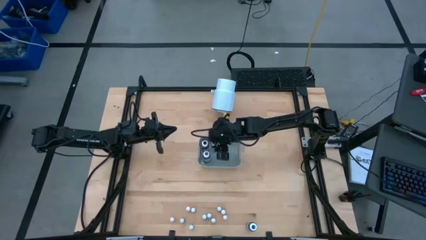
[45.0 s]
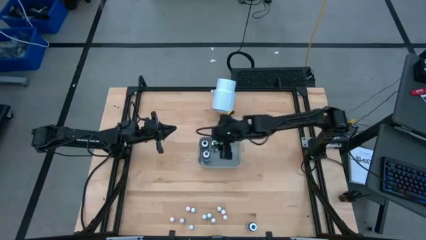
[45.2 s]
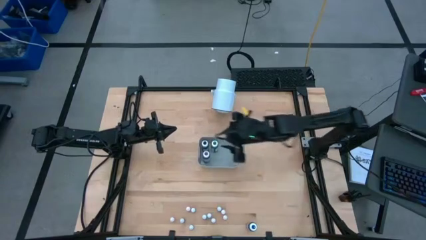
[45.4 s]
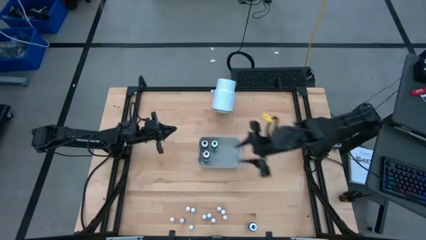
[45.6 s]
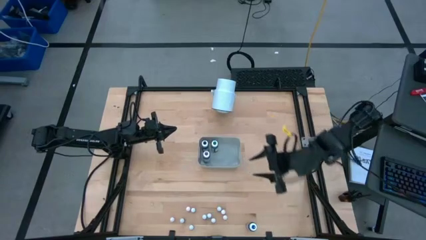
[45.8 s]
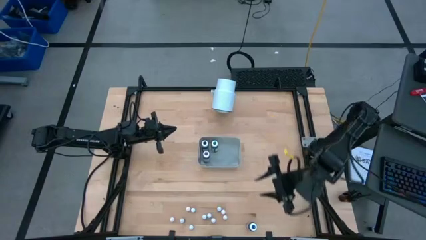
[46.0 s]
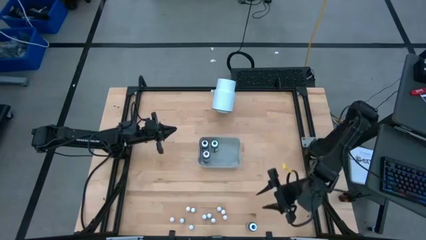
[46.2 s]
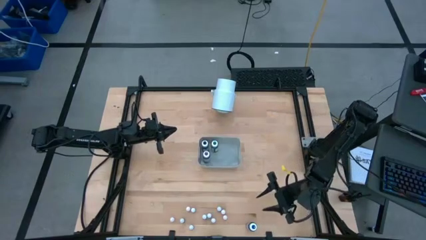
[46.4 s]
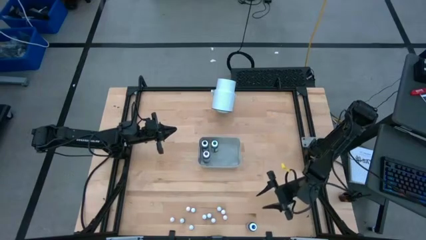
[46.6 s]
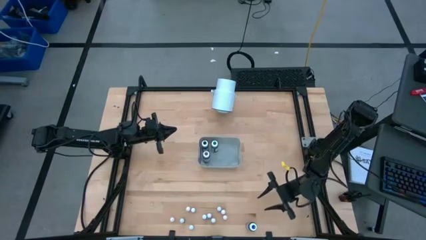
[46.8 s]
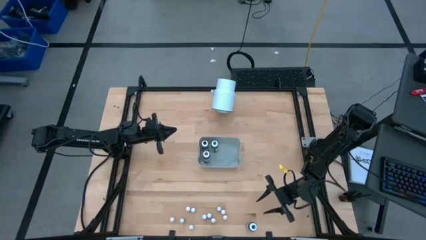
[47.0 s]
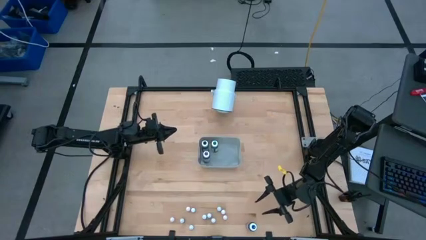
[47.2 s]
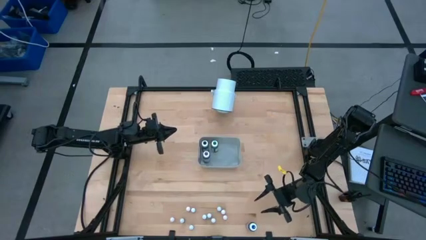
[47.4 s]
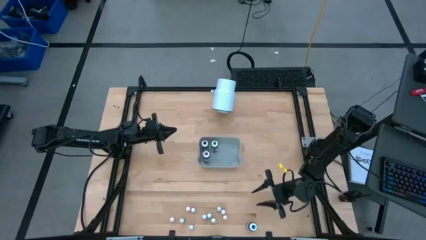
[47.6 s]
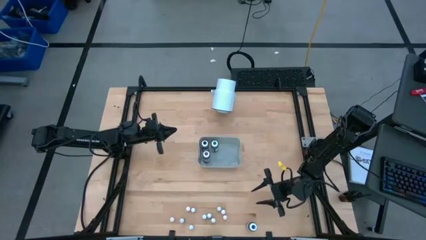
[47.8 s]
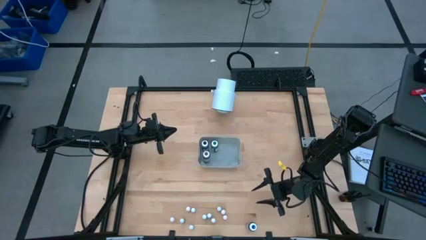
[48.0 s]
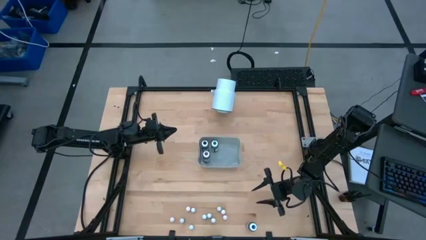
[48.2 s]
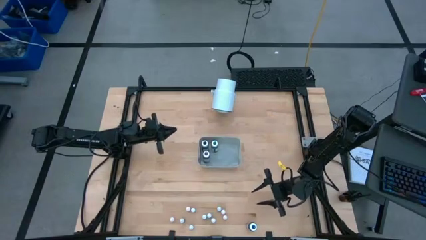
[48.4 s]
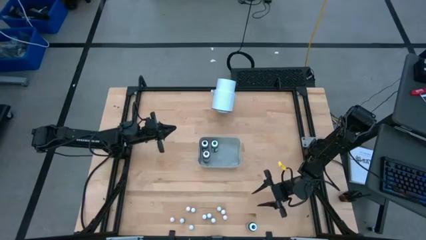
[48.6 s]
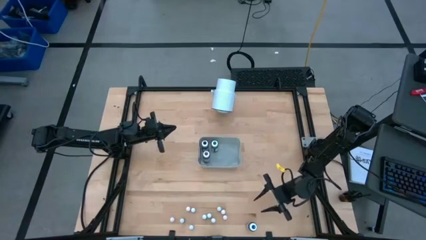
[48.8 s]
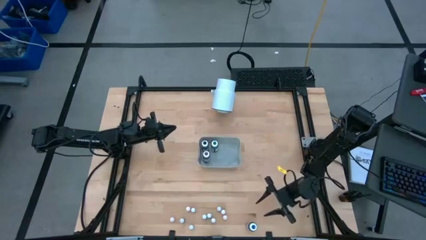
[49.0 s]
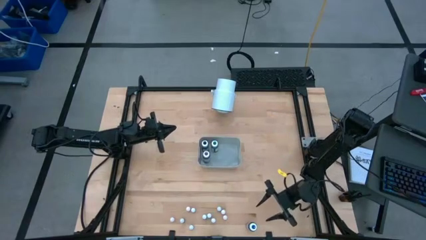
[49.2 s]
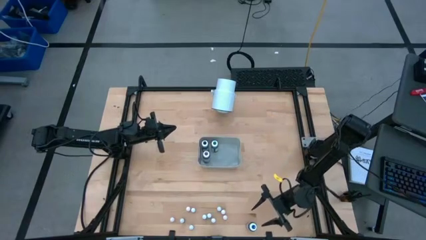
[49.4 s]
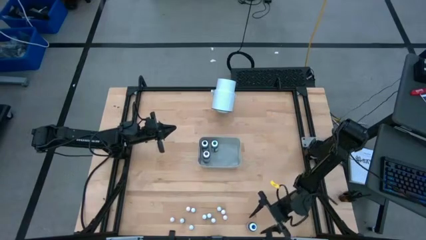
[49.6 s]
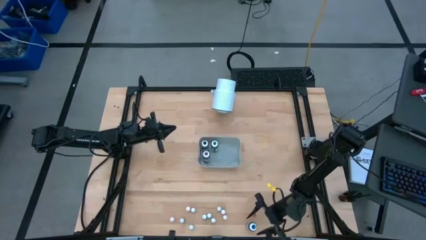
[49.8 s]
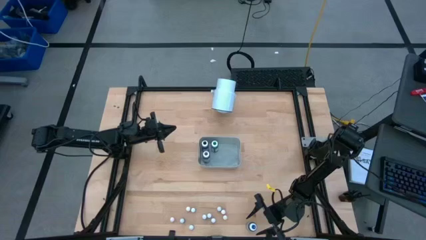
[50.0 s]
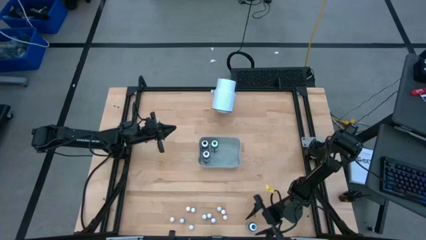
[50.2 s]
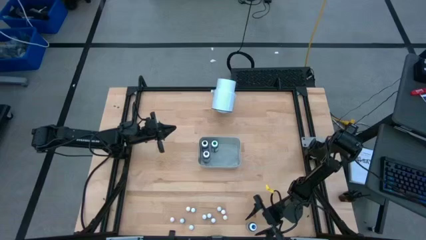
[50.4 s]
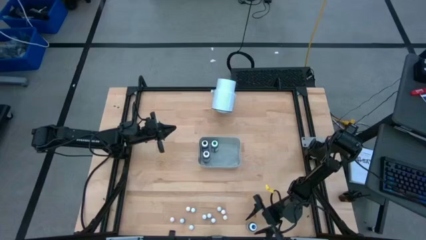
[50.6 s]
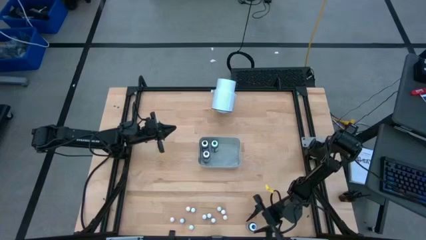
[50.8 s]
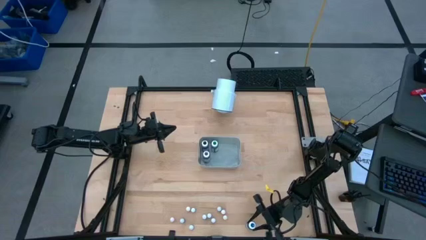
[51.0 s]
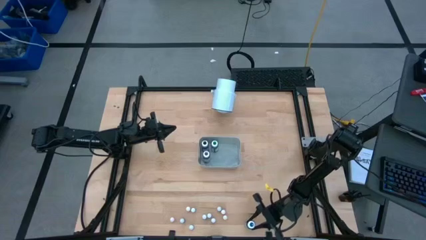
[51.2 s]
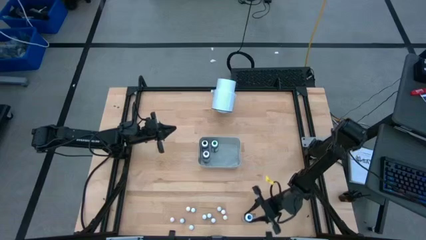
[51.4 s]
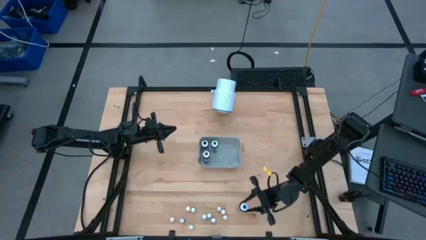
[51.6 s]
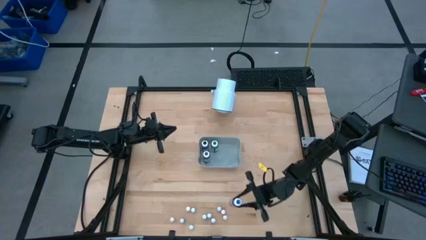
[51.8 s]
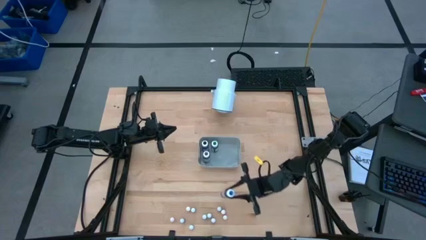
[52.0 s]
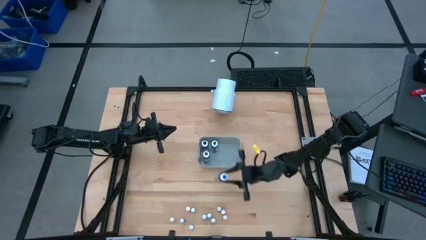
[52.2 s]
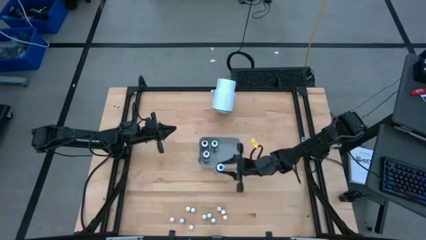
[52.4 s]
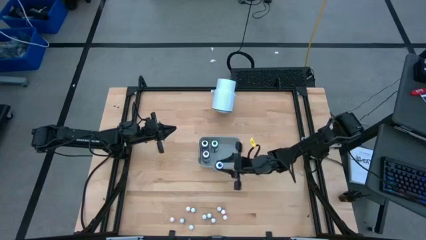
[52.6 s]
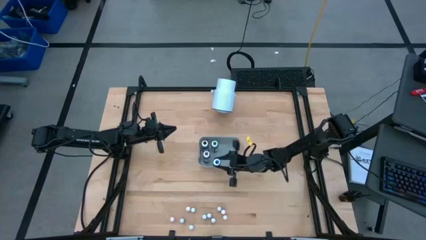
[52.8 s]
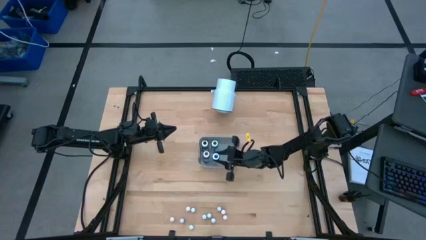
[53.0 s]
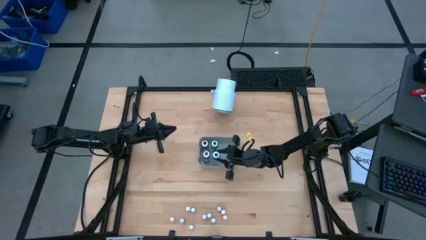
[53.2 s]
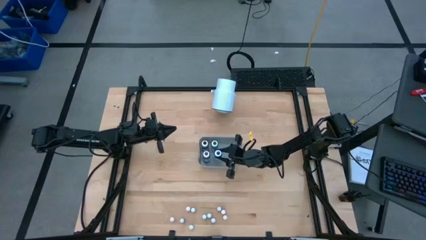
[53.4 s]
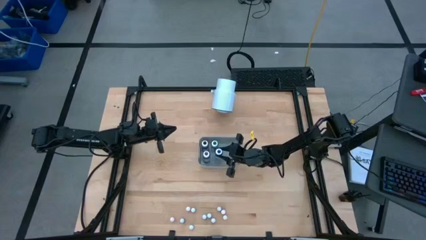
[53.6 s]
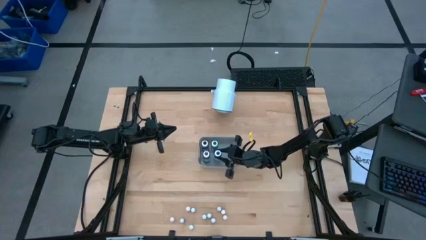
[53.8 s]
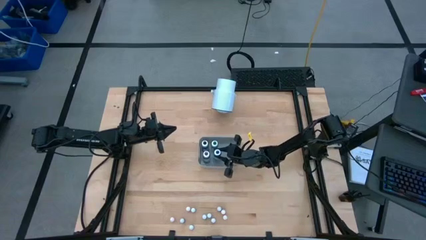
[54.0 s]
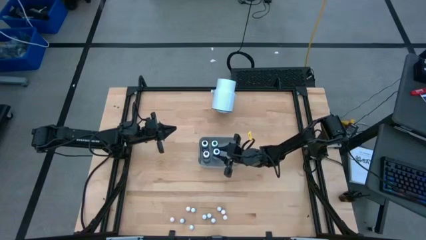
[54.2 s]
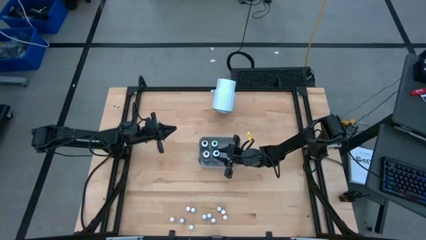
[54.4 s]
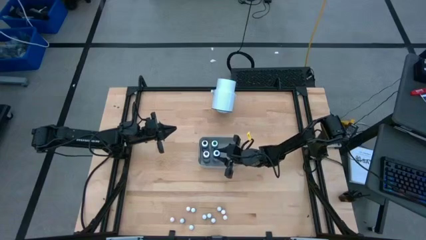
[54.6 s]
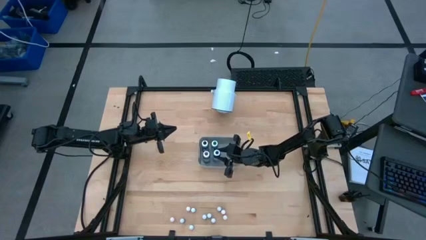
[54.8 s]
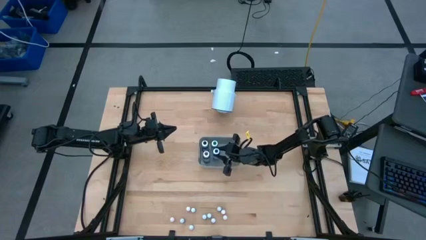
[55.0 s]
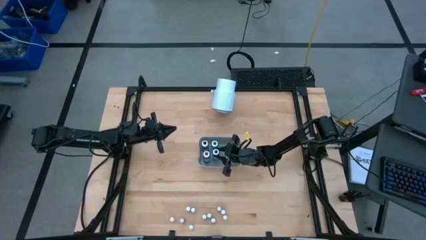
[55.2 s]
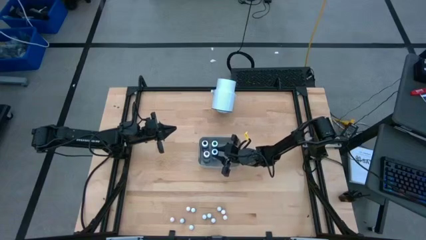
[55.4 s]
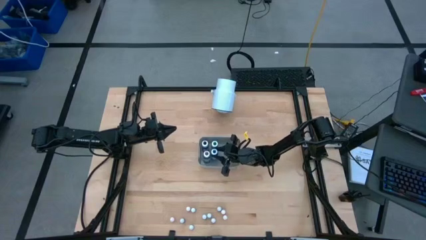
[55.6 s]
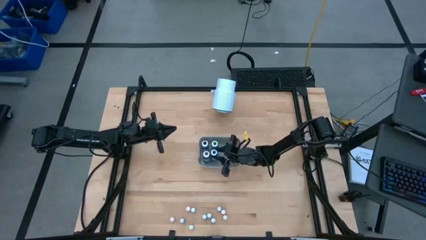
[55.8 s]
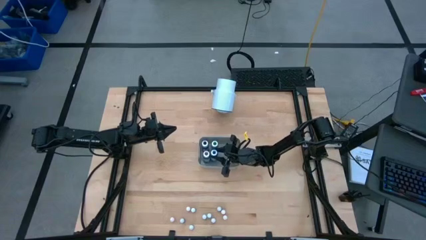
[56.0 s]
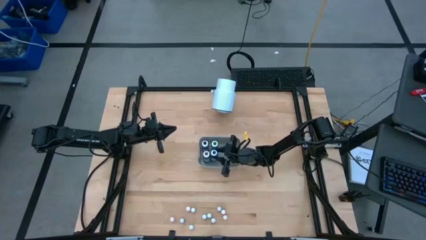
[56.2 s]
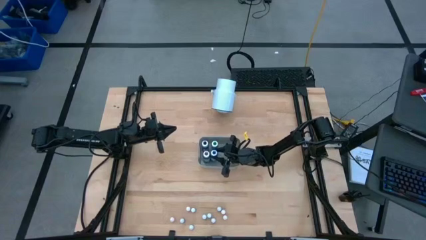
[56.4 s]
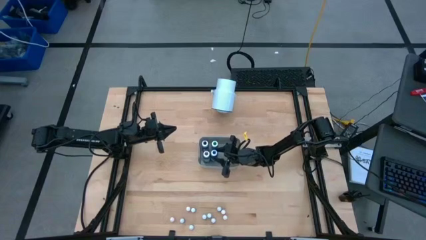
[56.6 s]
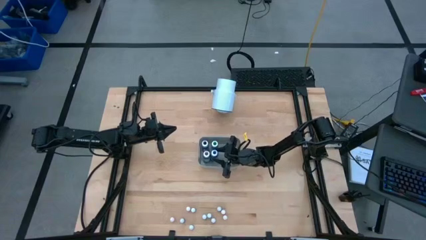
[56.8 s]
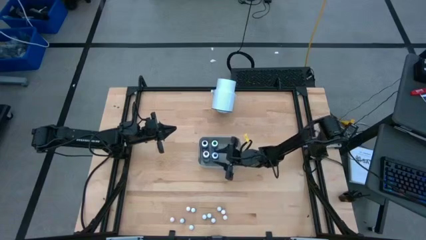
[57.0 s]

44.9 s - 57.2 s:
Task: Pick & Place food coloring
Put the large blue food coloring bottle into the gray bin

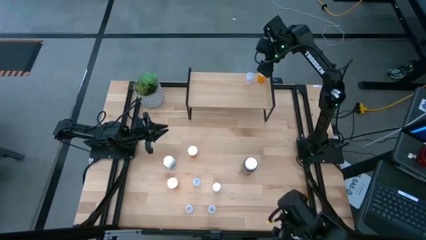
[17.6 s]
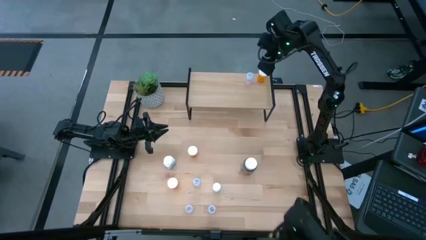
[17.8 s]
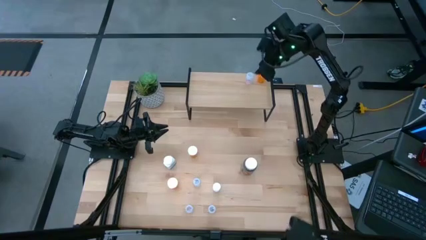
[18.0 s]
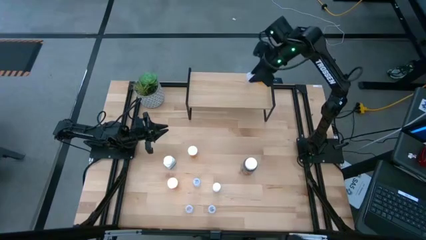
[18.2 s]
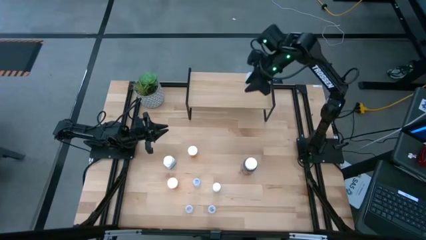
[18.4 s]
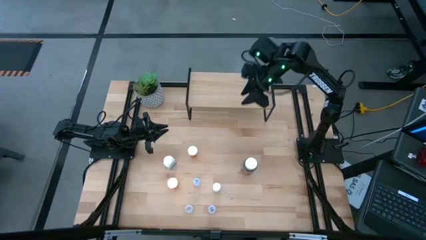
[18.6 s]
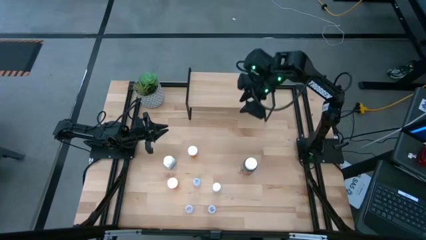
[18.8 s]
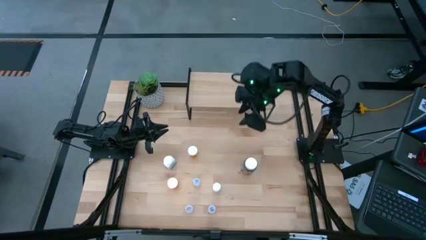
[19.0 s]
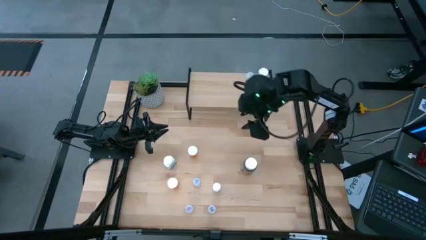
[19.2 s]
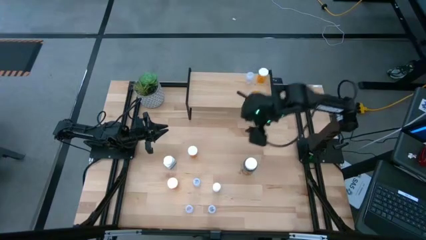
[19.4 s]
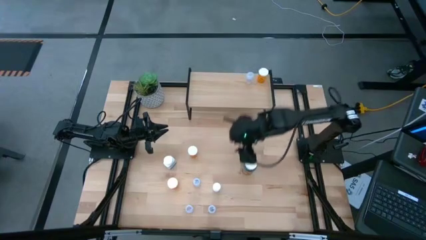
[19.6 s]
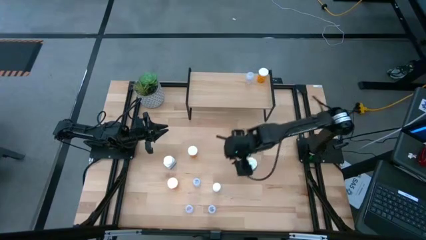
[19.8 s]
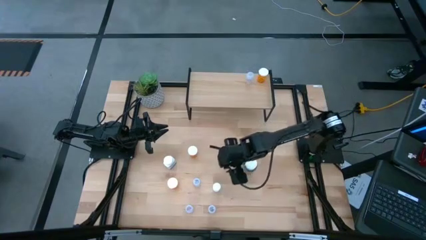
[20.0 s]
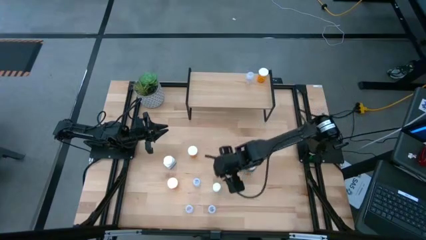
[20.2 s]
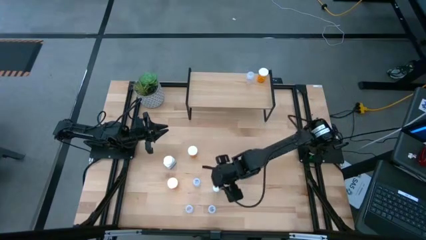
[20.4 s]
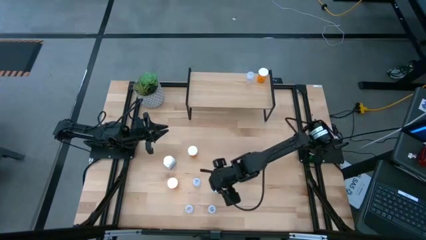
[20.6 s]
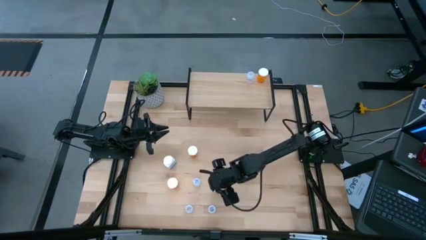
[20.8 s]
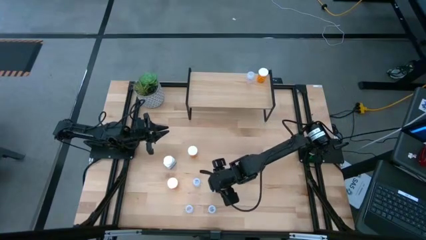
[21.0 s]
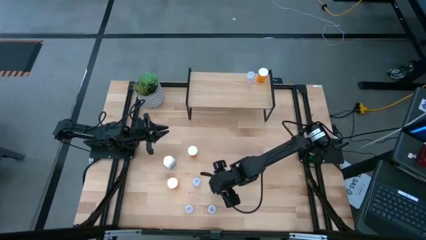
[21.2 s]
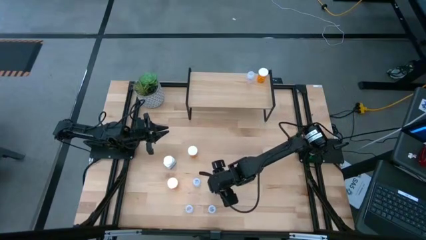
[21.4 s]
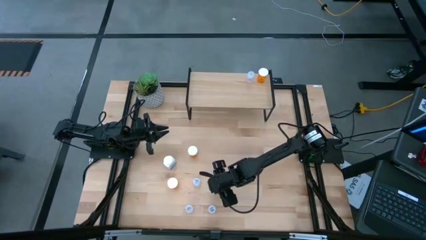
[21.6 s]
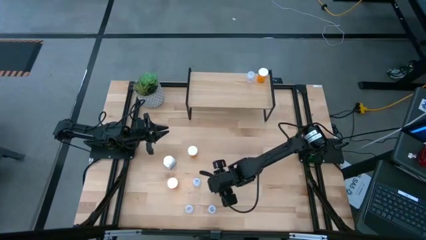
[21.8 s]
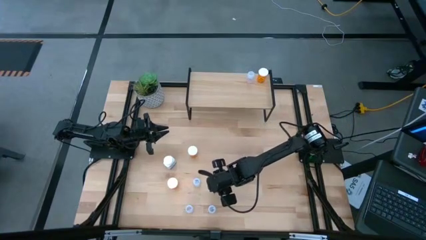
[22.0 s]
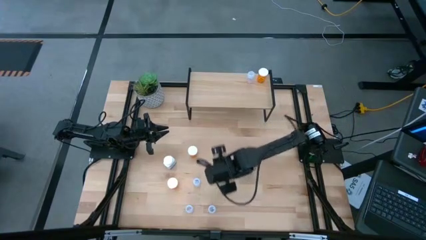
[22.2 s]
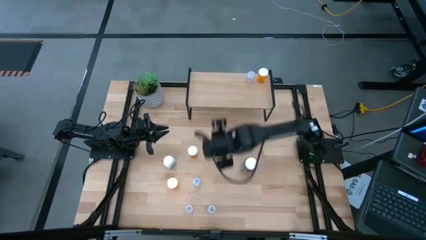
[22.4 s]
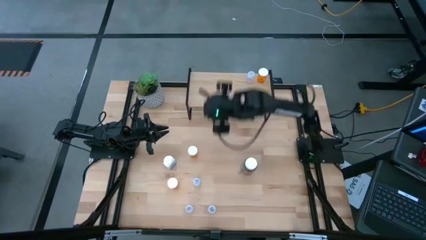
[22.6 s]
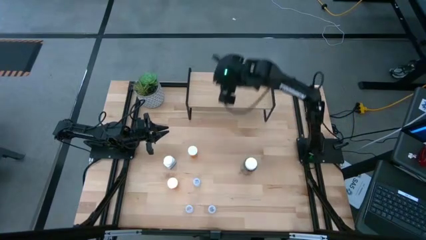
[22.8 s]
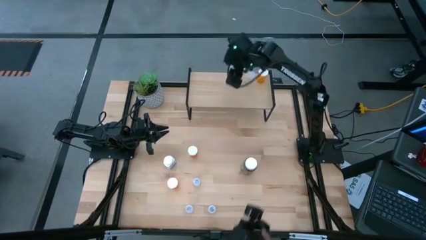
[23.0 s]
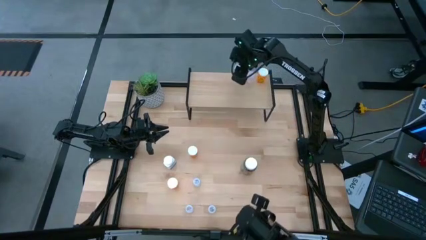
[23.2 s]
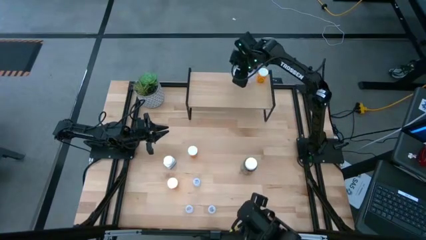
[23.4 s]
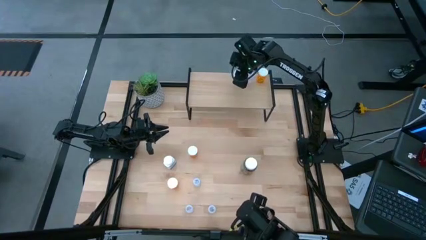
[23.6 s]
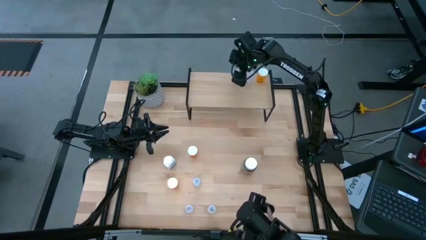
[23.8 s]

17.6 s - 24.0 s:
Task: Pick and place medicine bottles onto shelf by color
Put the white pill bottle on the shelf
